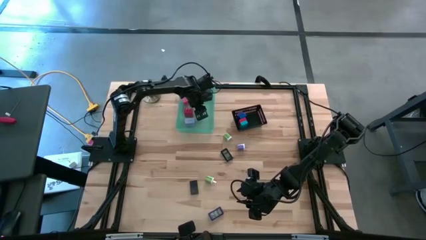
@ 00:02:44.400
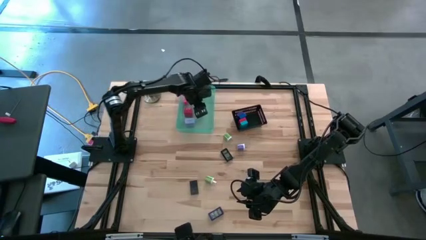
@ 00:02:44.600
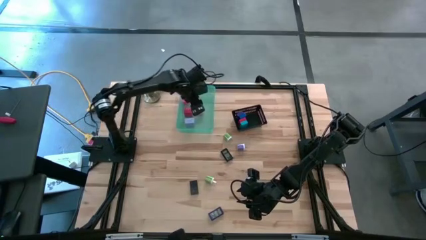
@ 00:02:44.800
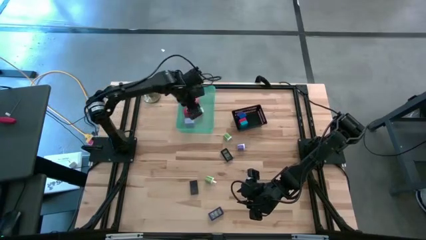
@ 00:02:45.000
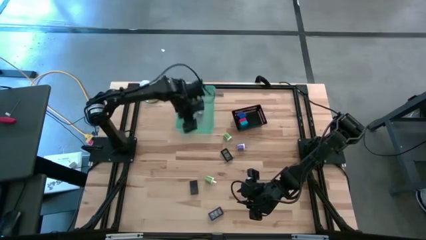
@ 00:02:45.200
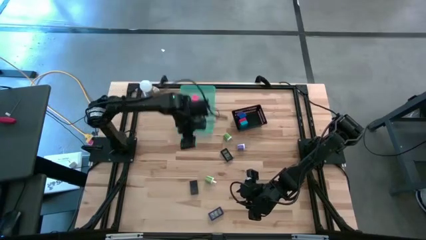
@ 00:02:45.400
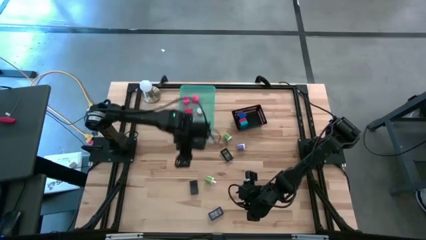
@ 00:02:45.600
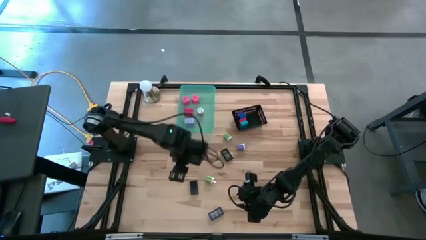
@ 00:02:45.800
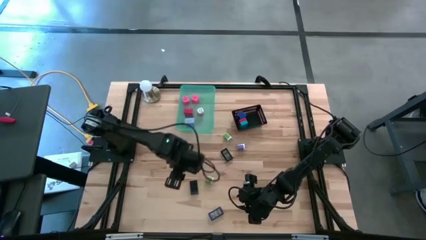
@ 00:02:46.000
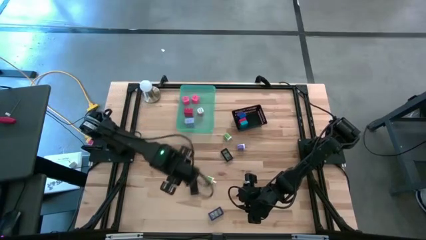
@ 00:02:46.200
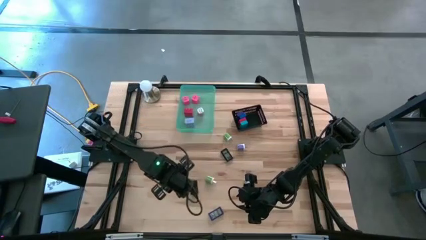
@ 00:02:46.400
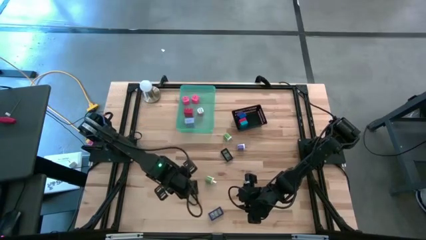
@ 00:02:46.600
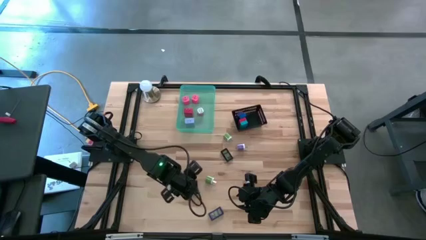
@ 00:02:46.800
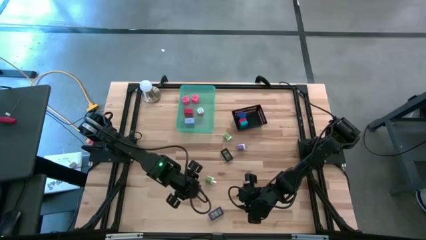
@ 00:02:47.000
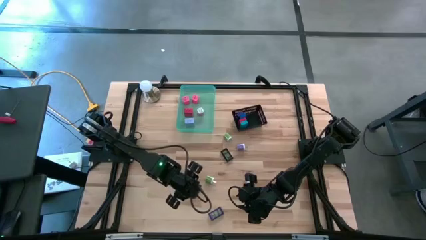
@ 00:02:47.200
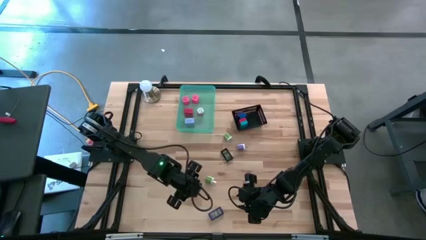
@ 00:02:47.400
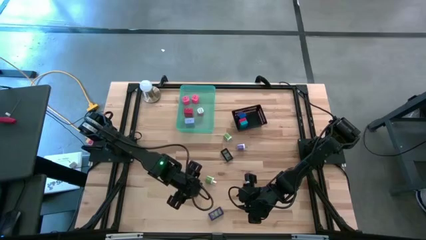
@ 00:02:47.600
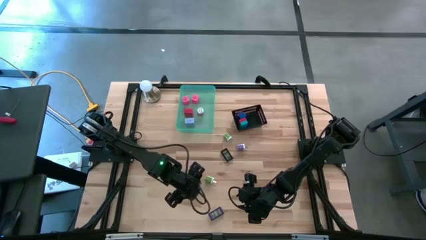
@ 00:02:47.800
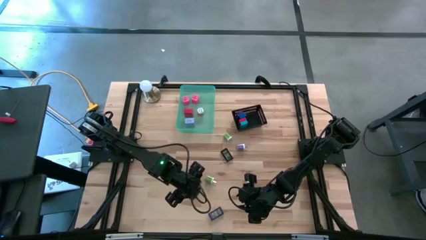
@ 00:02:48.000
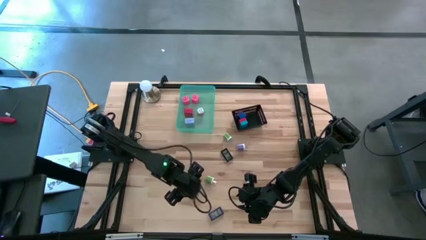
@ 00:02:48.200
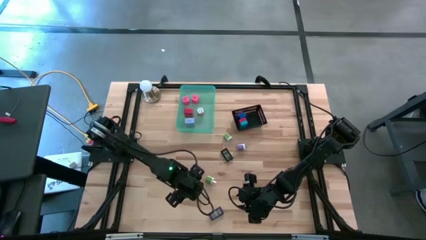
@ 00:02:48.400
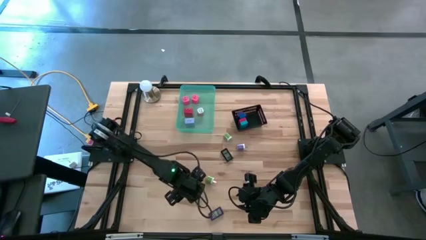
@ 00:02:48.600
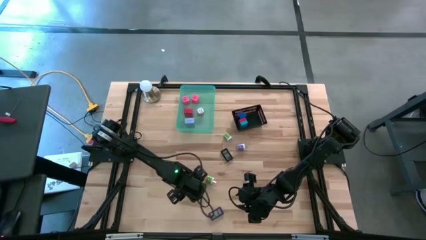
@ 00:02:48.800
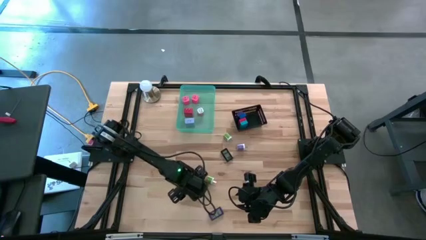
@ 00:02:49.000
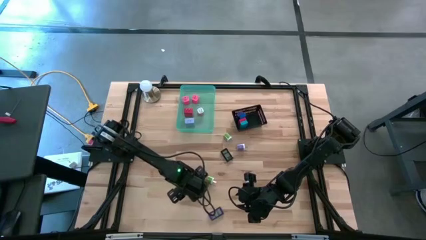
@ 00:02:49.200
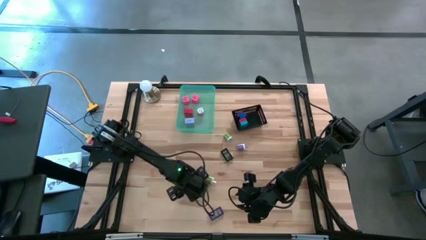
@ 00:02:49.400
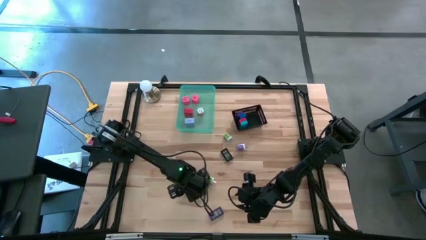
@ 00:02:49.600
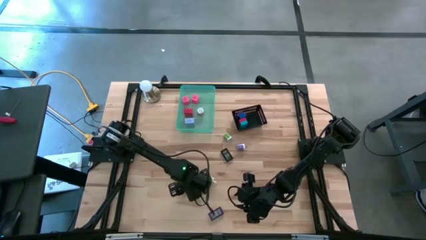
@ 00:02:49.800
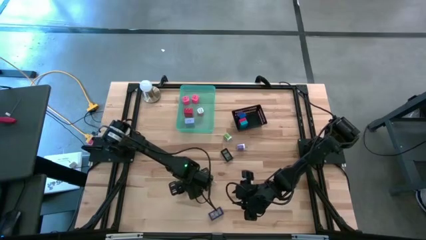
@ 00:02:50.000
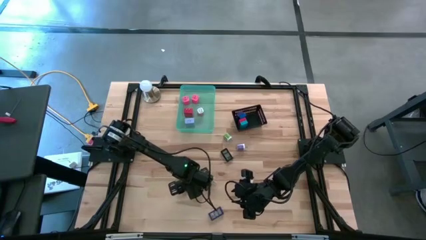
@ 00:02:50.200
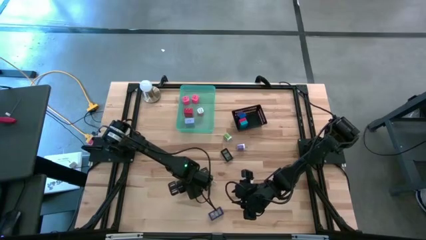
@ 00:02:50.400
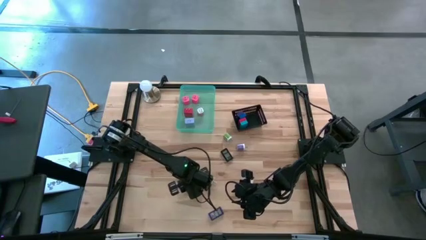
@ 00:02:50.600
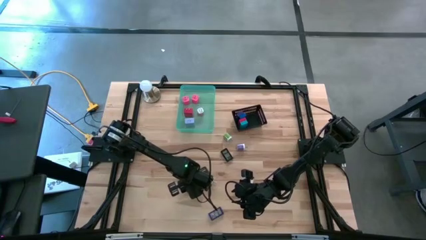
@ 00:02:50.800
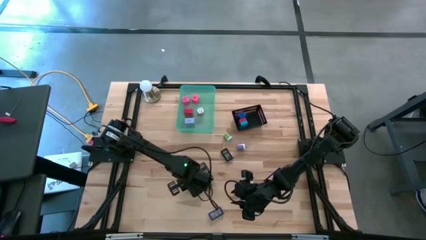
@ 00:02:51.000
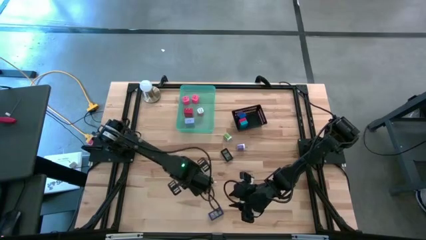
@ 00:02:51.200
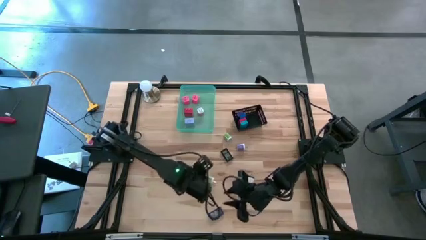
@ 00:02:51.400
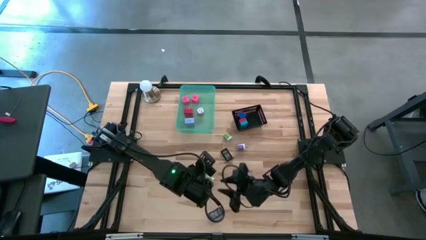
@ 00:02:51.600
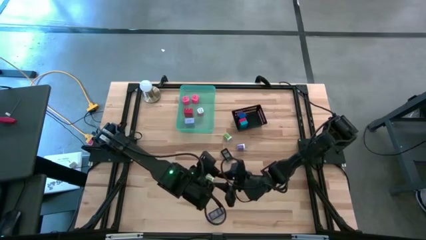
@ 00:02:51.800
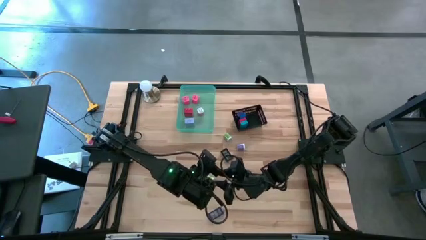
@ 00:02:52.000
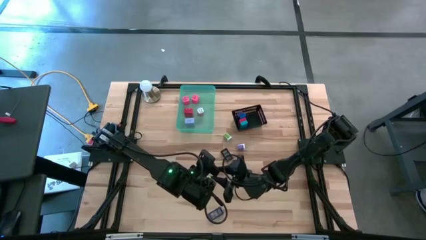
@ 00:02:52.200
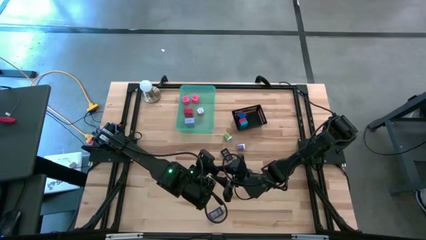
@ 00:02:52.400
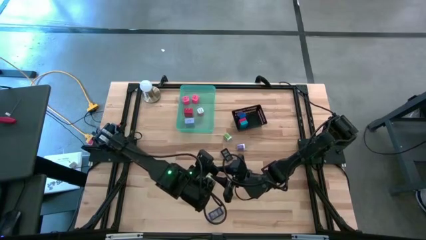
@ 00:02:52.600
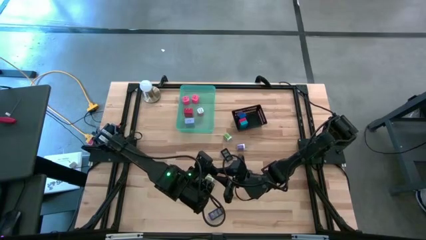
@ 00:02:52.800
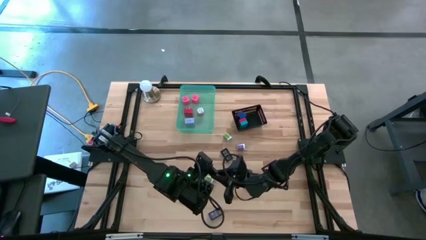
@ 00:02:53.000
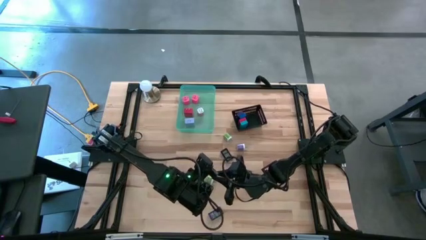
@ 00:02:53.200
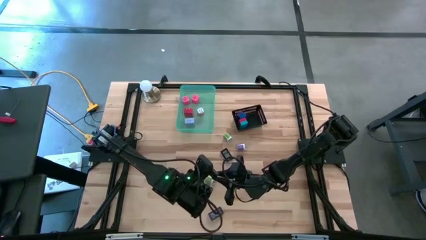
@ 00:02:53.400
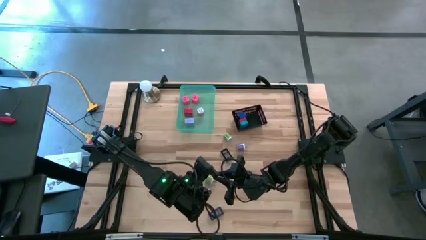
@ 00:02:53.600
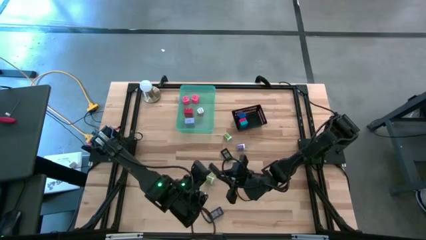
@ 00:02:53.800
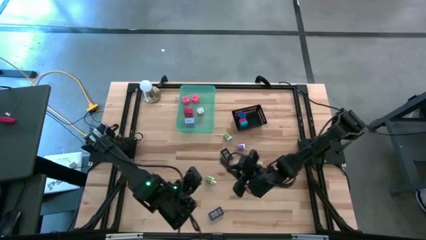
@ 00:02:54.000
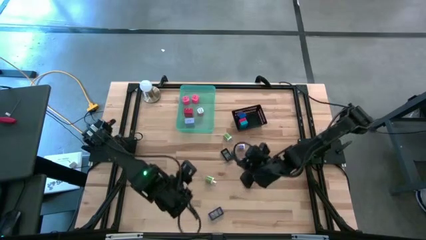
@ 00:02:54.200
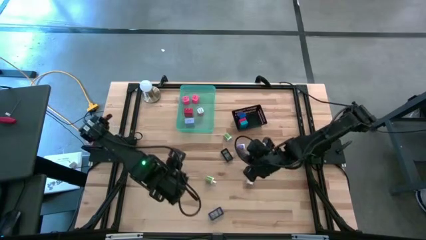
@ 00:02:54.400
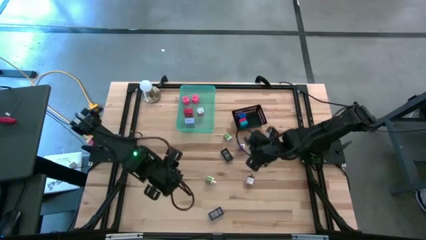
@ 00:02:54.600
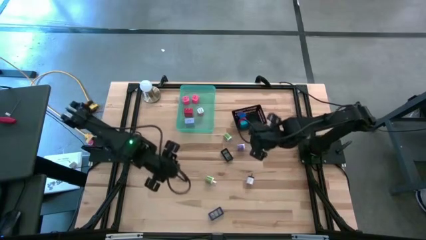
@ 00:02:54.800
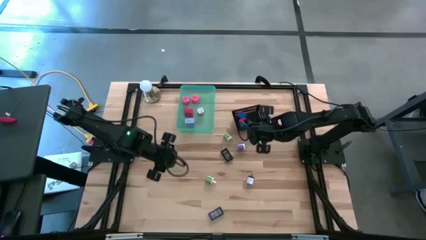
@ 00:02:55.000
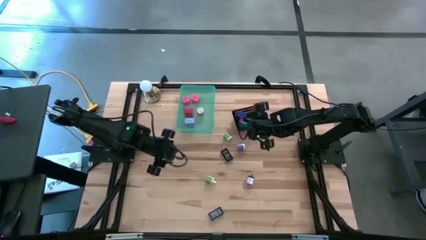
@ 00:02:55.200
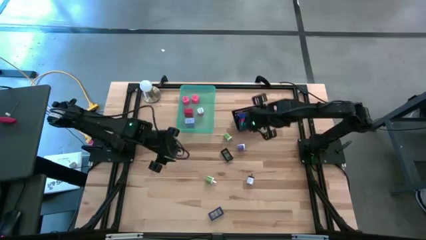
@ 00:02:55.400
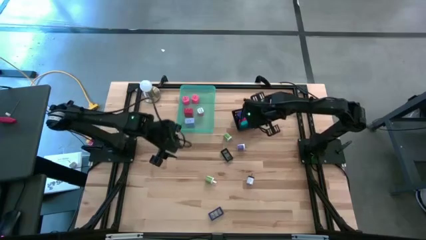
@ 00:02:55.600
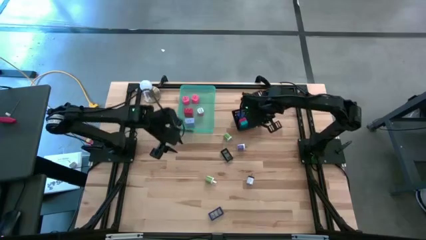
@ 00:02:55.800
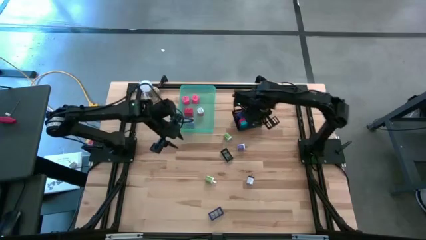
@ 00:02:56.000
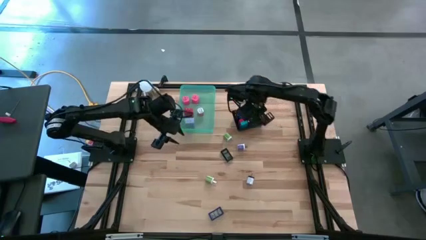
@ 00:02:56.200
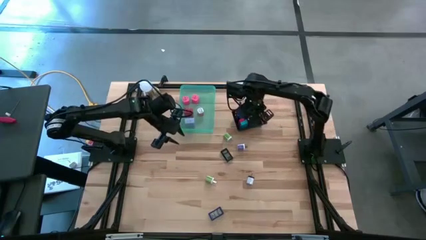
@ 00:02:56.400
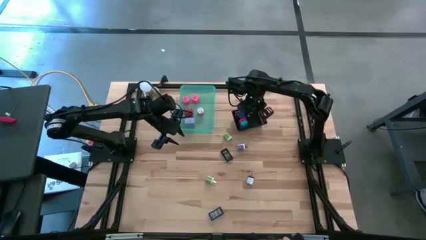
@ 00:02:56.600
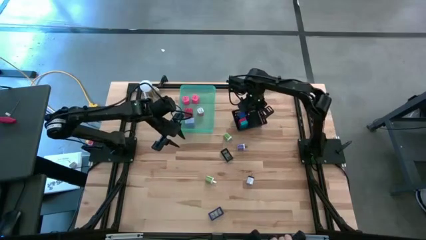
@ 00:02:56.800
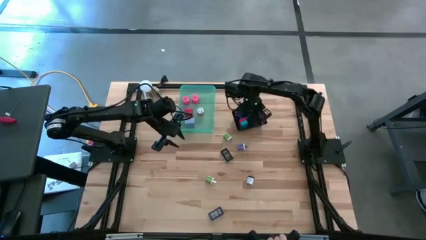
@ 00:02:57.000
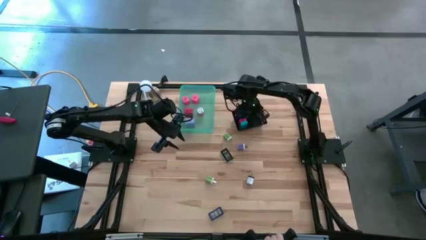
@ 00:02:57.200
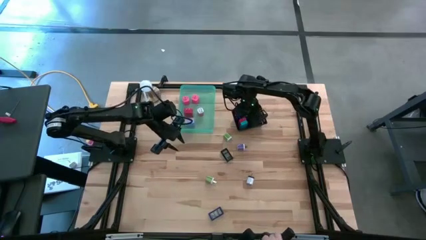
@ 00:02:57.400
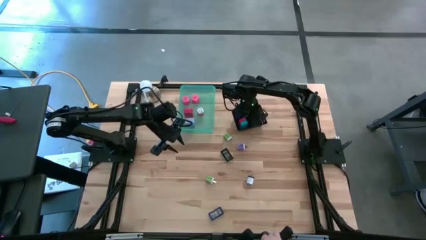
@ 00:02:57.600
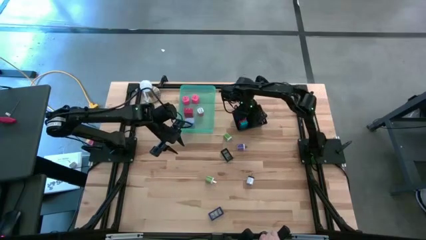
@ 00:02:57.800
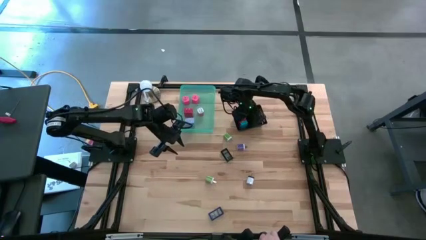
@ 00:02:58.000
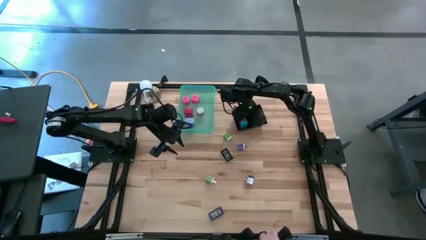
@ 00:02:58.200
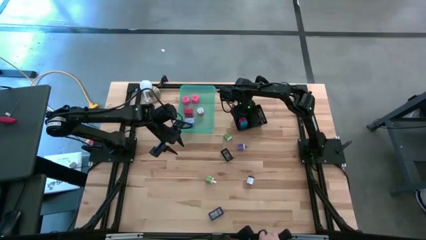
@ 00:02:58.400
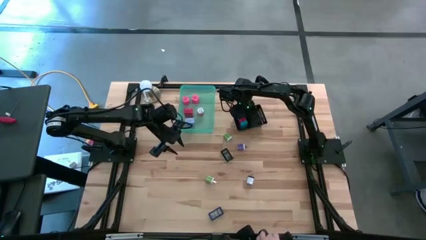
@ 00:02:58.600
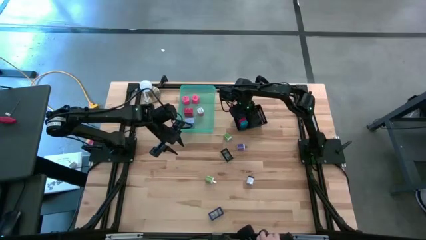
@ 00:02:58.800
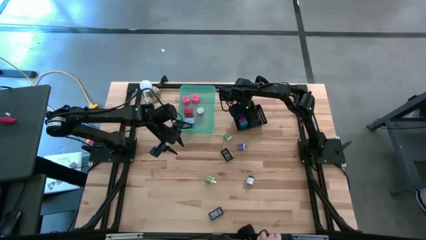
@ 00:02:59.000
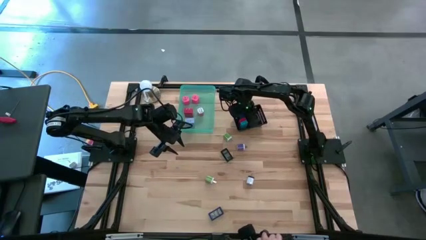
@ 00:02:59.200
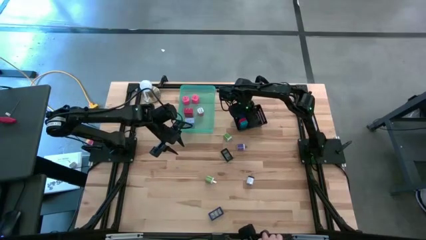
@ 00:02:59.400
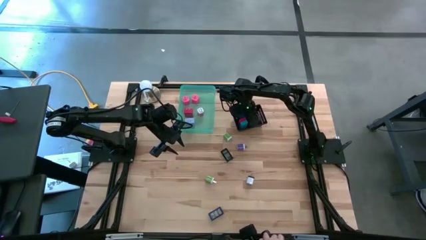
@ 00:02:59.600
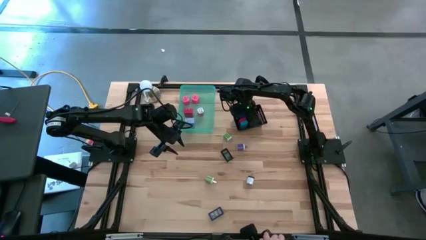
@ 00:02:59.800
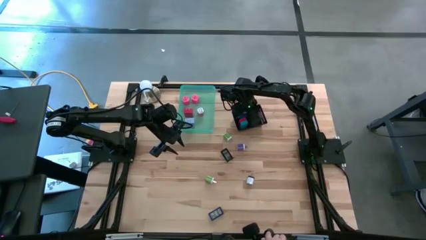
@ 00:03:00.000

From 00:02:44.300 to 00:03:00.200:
Task: Pick & Place Office items
Put the bottom black digital clock into the black bin
